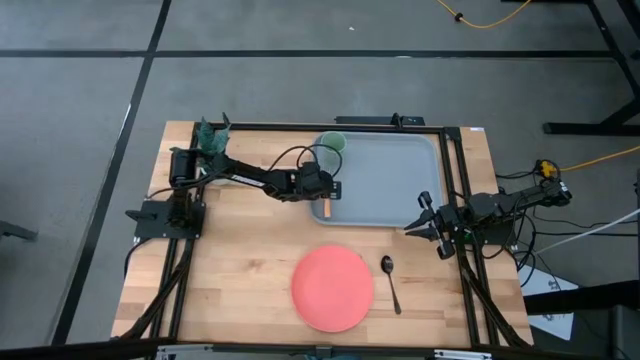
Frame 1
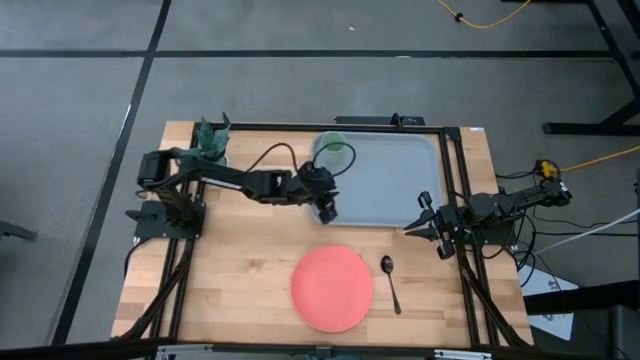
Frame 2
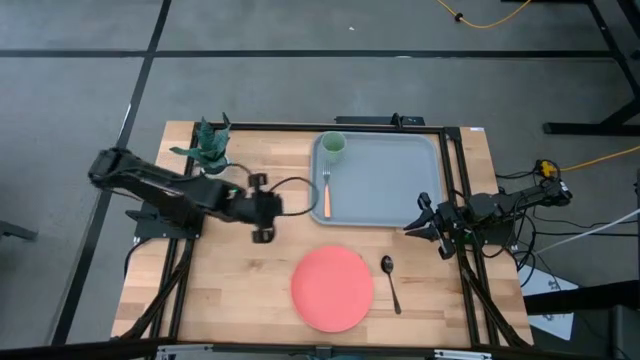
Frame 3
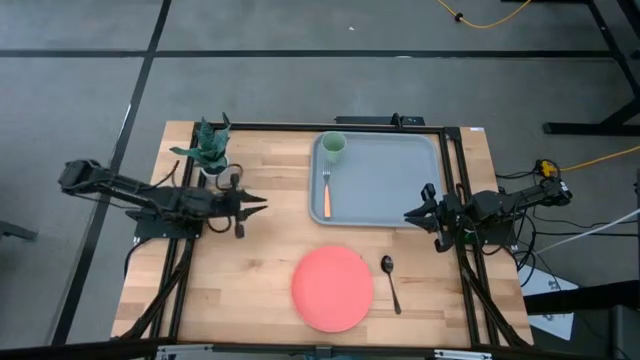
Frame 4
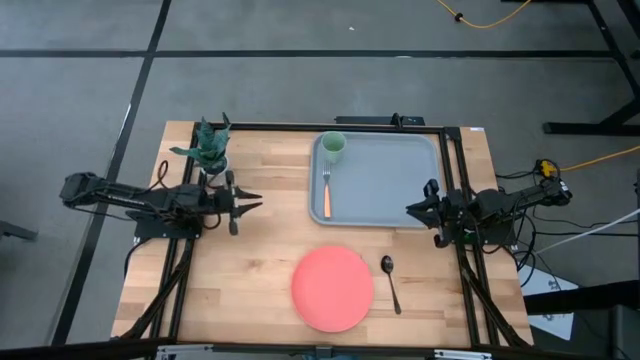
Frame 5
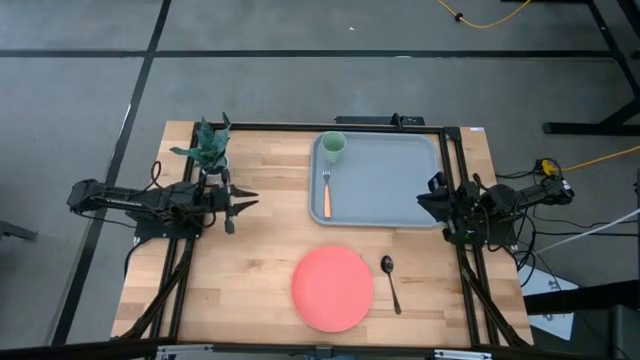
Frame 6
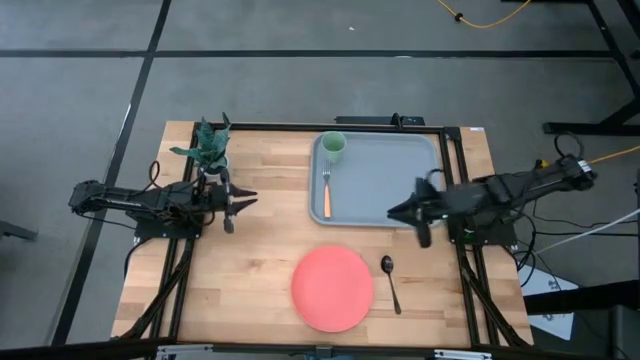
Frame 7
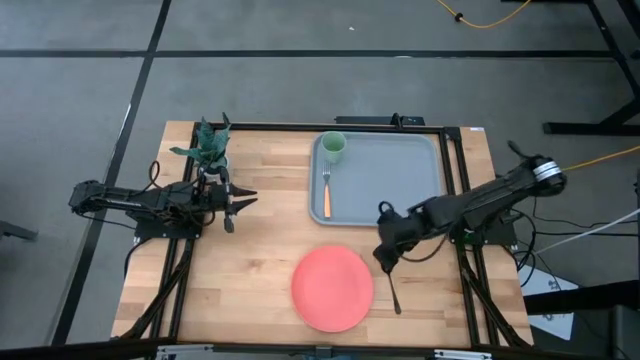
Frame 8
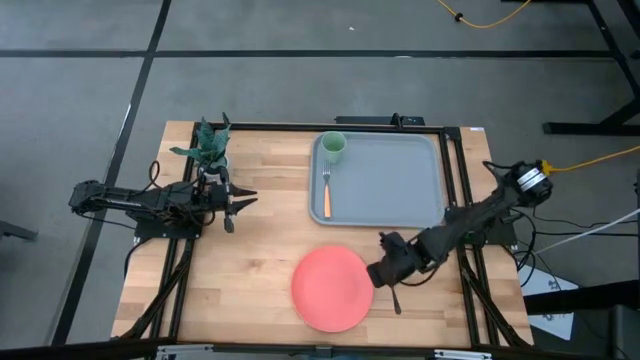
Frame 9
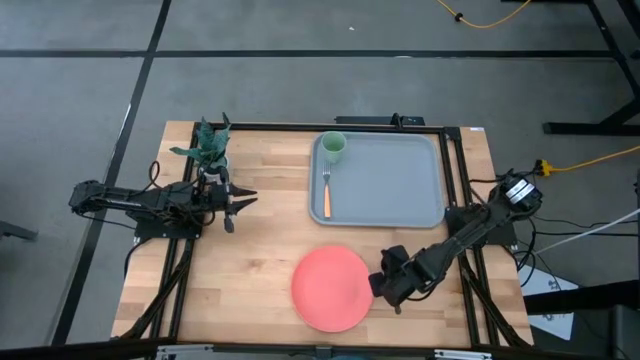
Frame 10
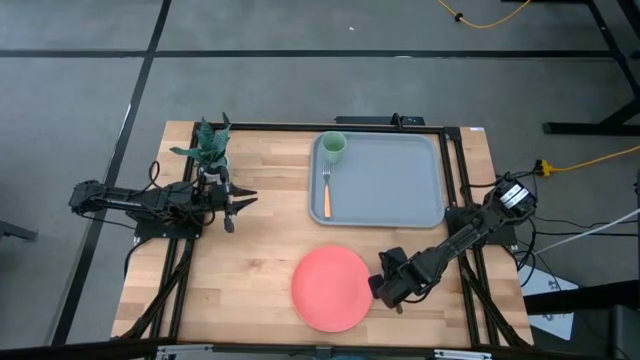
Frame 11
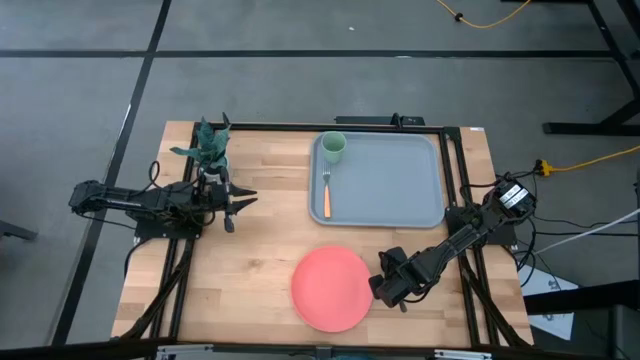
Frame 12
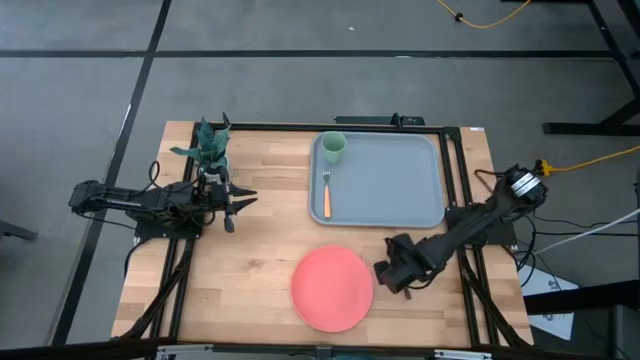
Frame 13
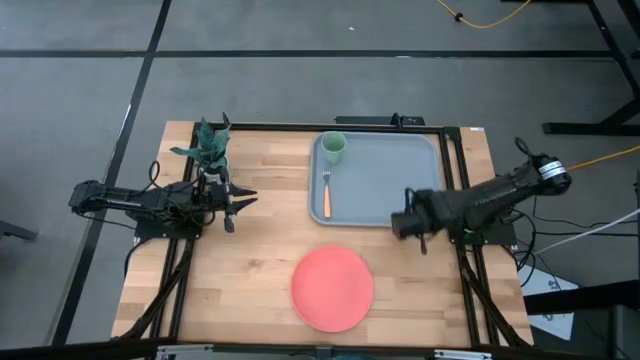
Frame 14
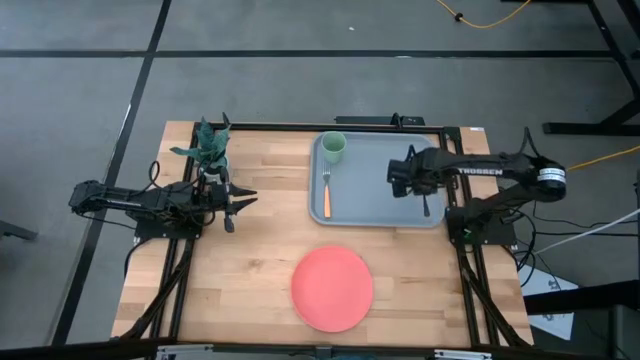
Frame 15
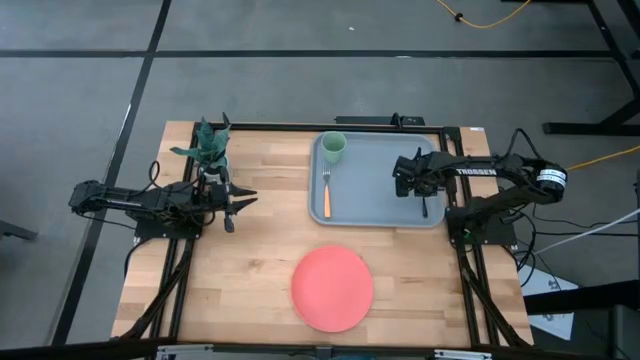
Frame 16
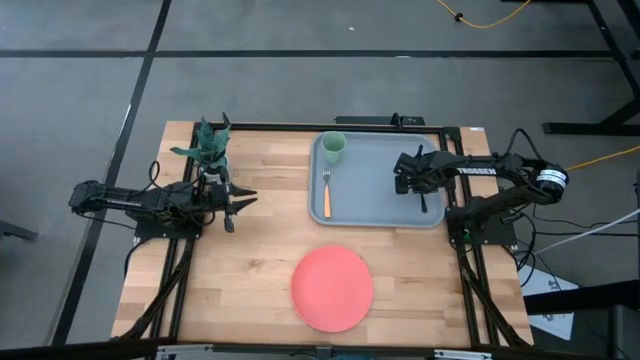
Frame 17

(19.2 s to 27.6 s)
Task: Pick and place plate/cup/fork/spoon on tray
Put the black spoon to the bottom right of the blue serving tray

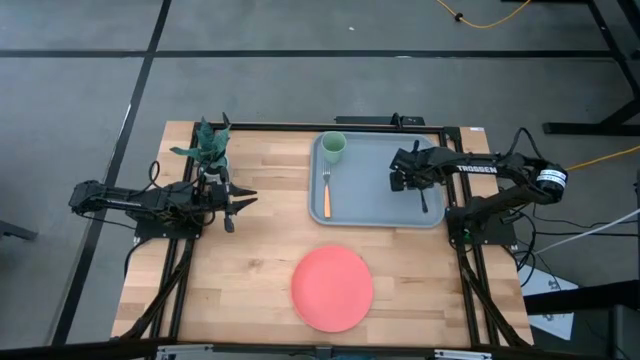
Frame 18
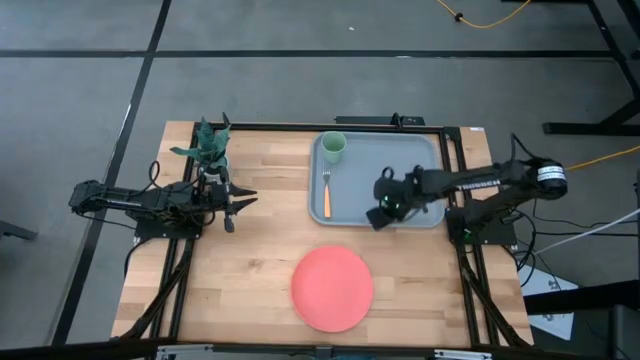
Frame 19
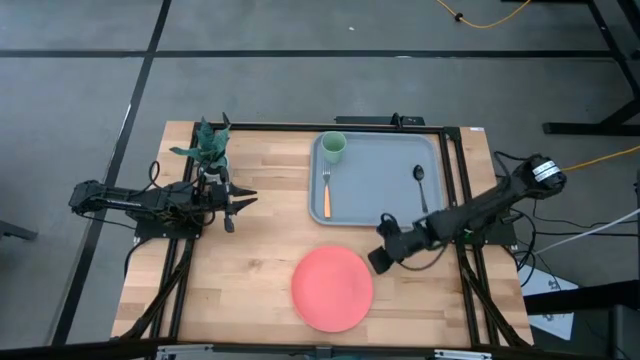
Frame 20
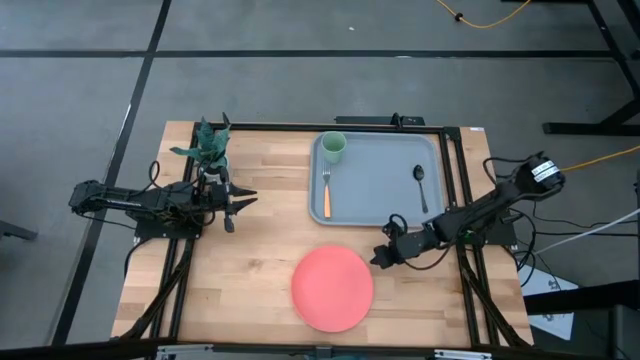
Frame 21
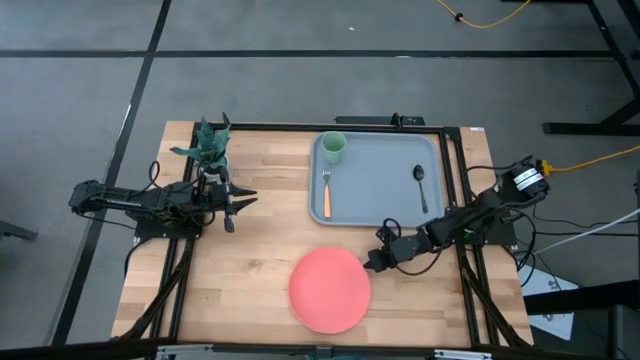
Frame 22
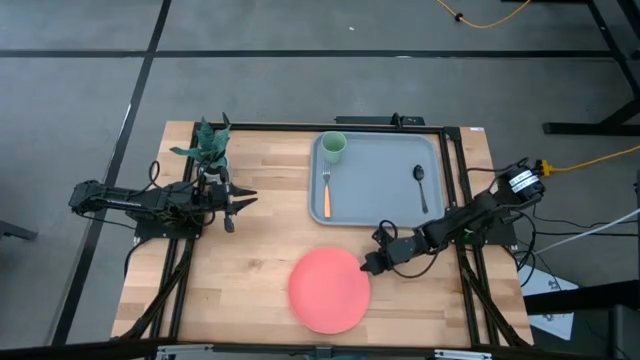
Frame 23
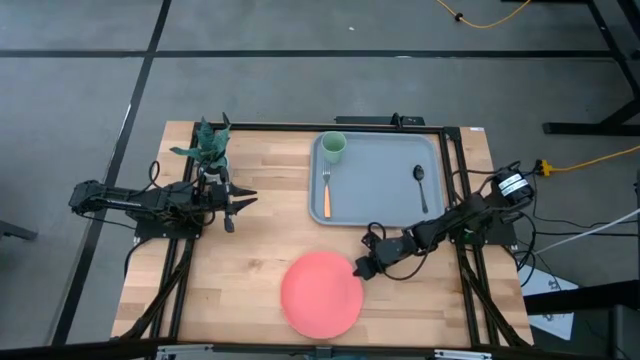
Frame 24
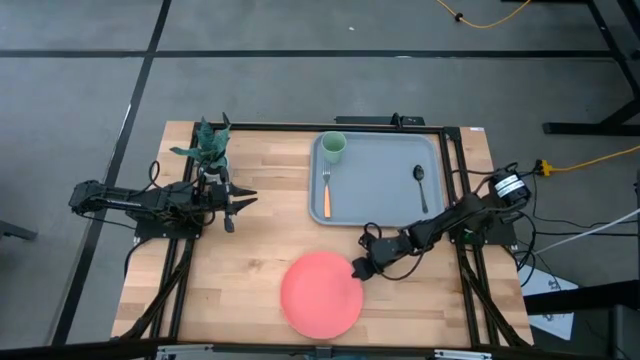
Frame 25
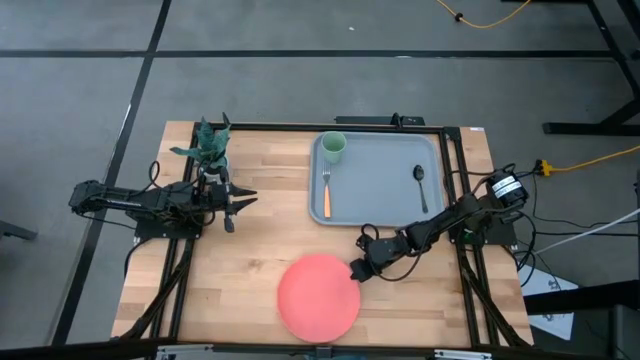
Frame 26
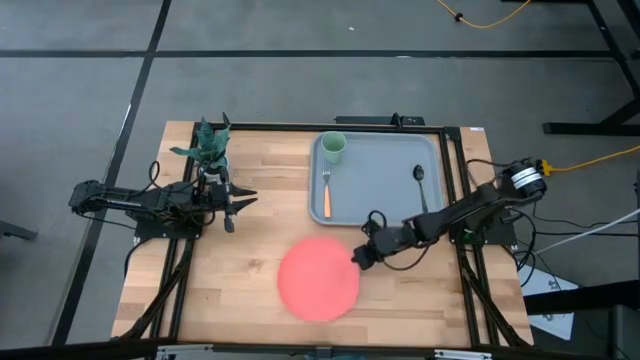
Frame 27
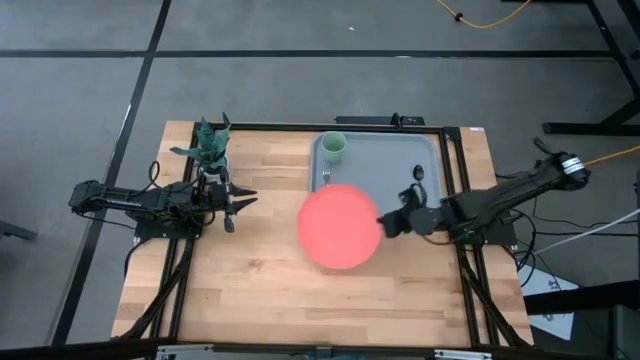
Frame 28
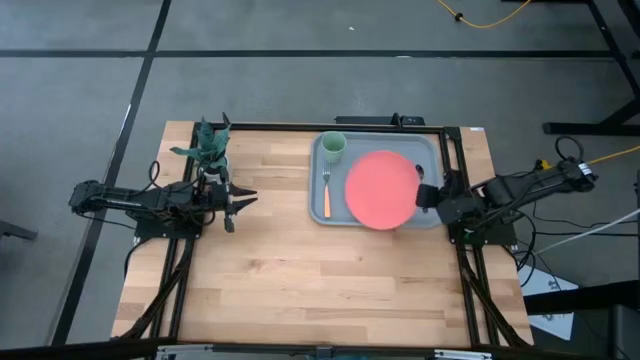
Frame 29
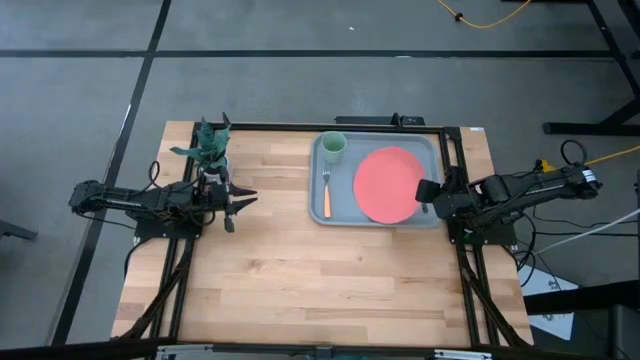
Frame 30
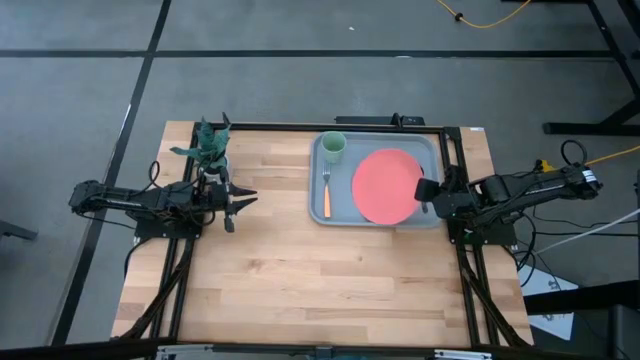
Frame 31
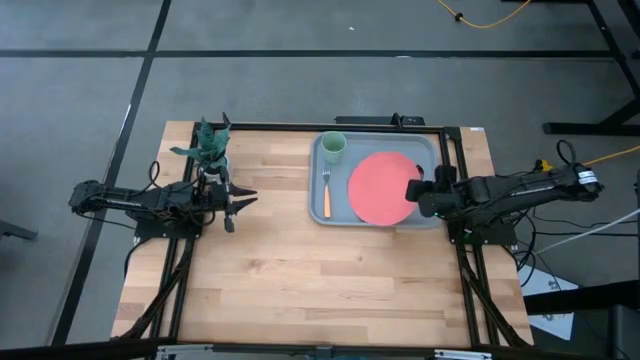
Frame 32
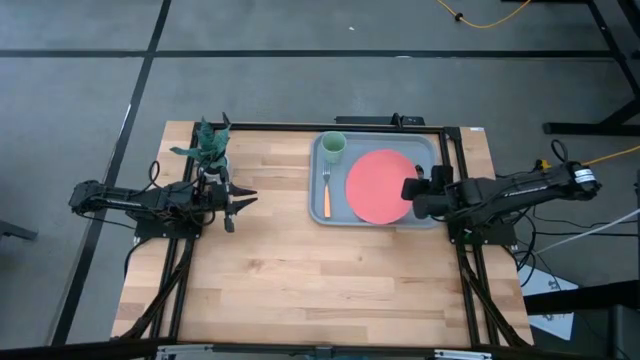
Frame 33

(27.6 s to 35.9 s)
Put the pink plate between the fork and the spoon on the blue serving tray

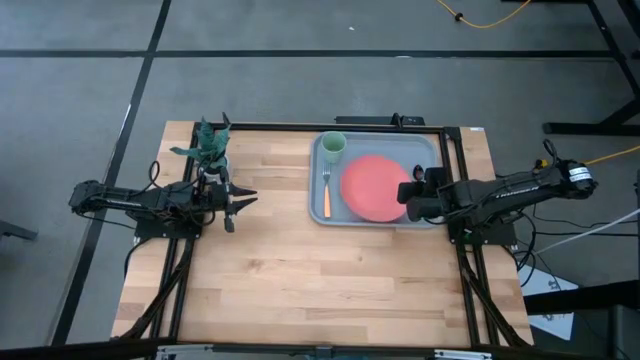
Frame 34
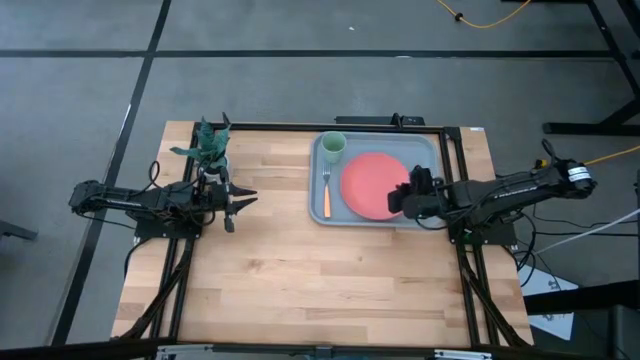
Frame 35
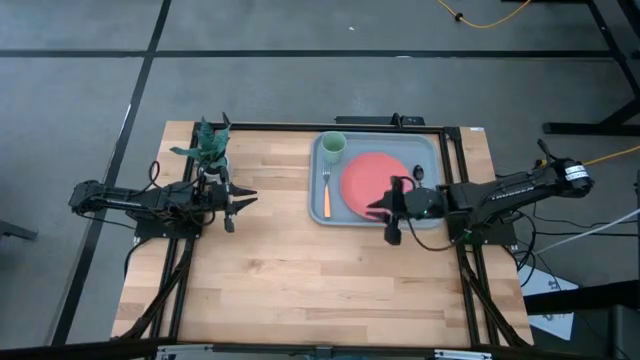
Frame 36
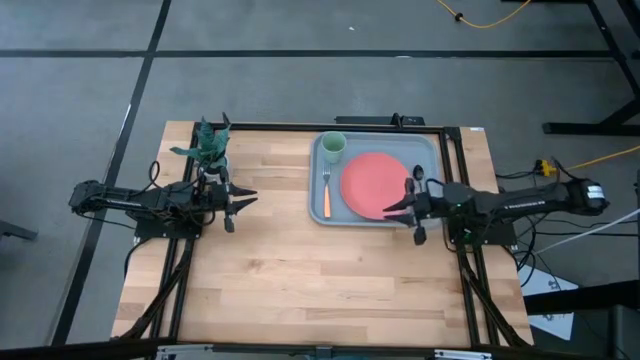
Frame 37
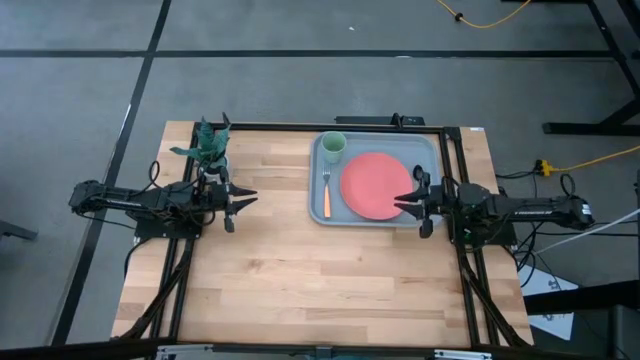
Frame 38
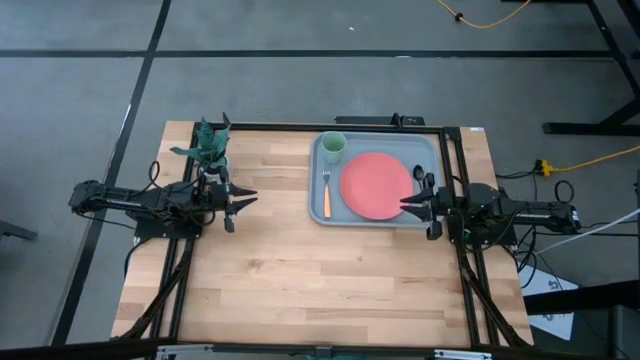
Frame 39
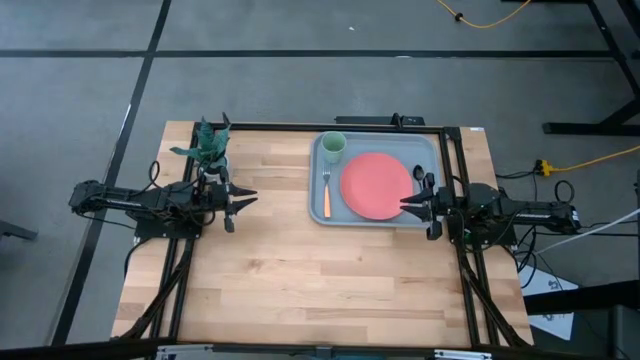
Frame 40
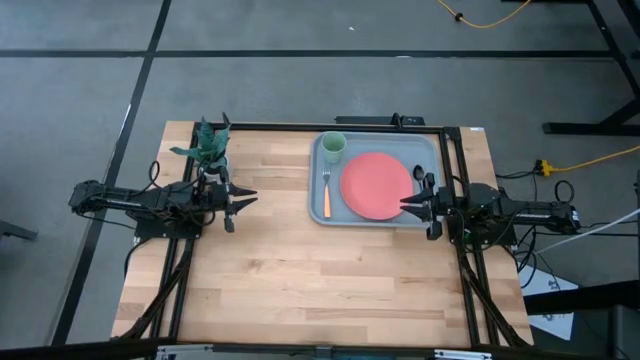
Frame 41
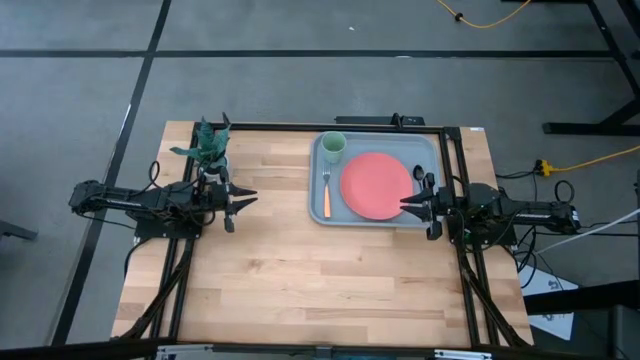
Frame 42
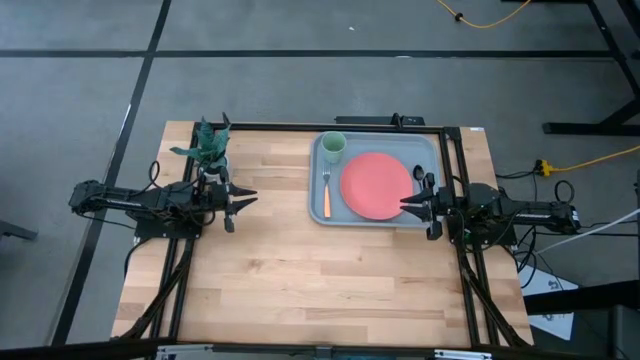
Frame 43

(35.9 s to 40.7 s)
Return to Home Position
